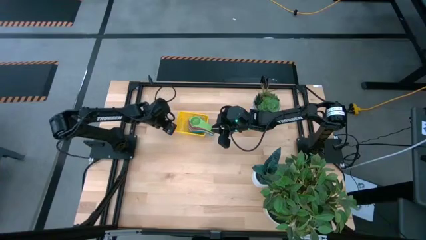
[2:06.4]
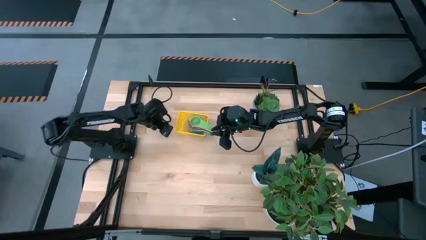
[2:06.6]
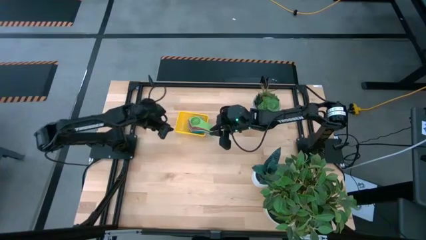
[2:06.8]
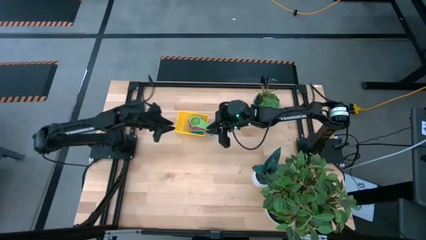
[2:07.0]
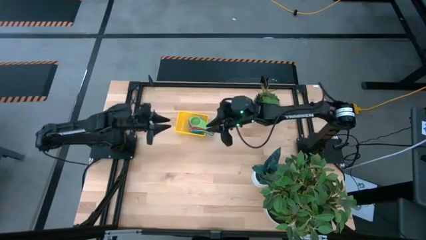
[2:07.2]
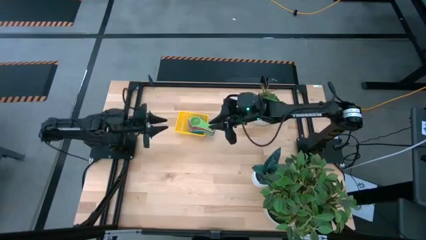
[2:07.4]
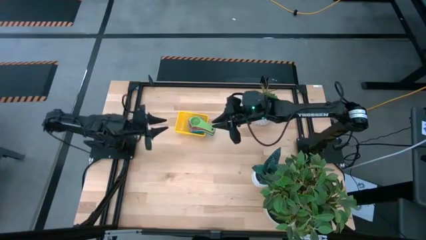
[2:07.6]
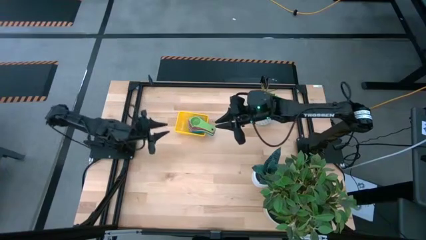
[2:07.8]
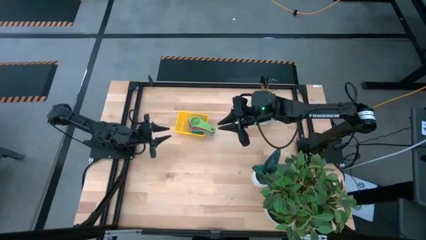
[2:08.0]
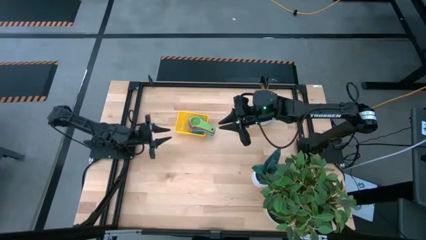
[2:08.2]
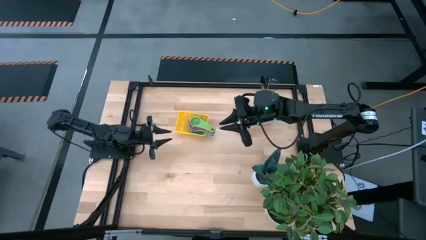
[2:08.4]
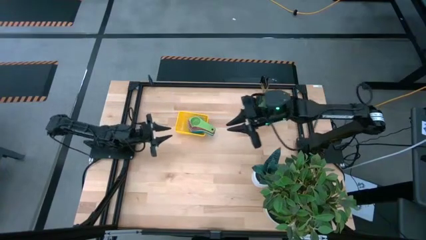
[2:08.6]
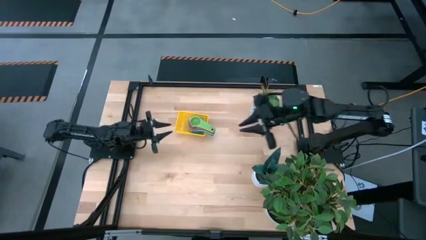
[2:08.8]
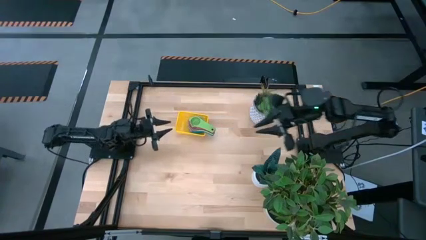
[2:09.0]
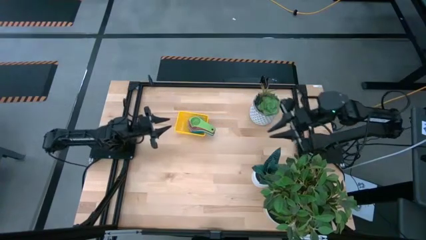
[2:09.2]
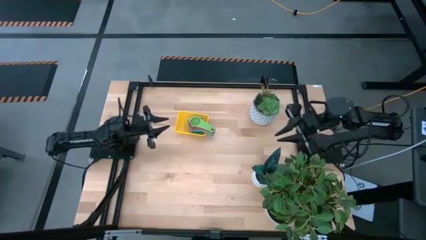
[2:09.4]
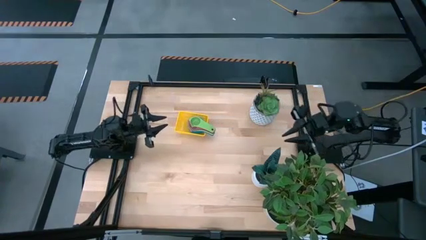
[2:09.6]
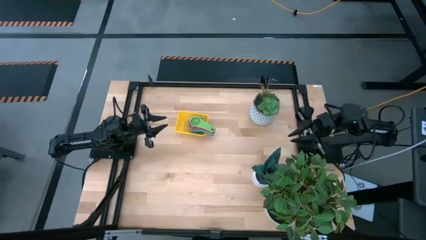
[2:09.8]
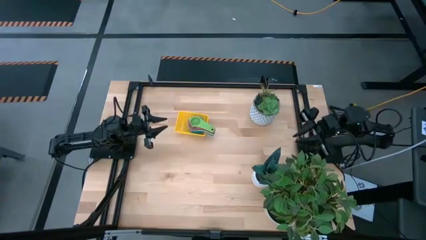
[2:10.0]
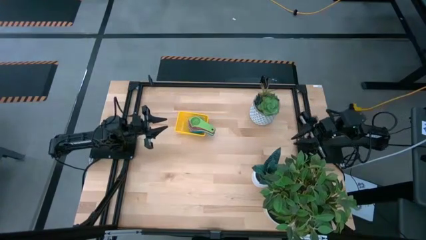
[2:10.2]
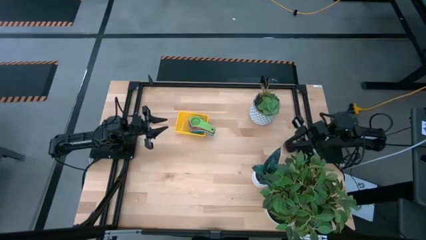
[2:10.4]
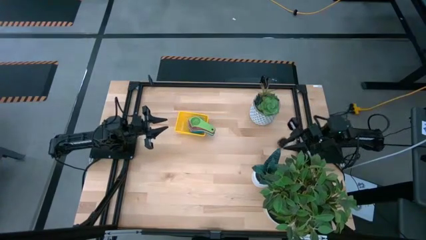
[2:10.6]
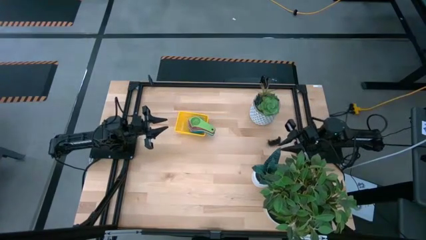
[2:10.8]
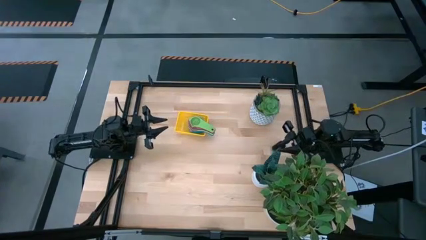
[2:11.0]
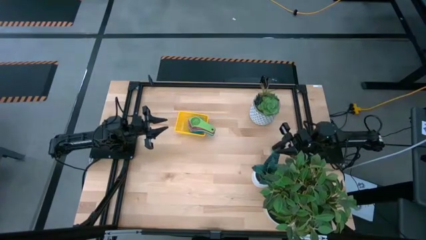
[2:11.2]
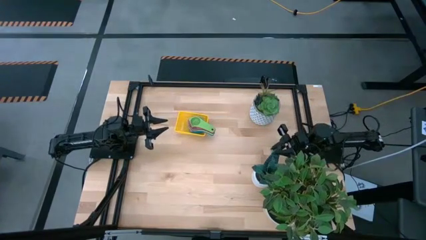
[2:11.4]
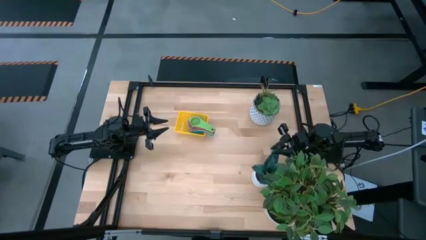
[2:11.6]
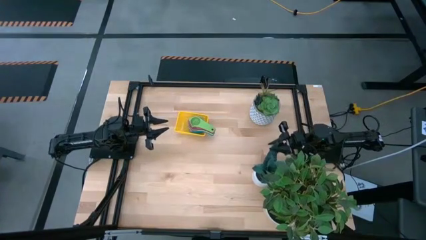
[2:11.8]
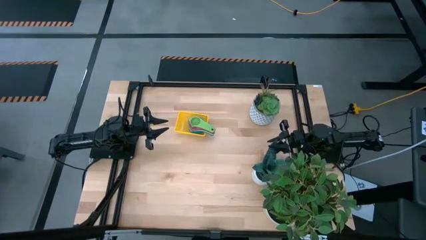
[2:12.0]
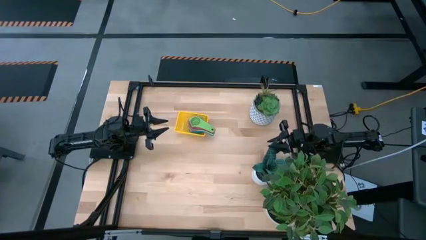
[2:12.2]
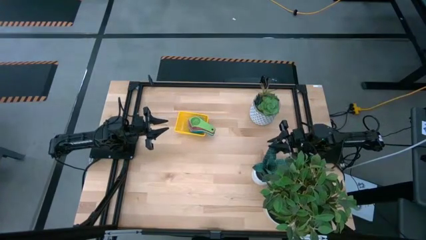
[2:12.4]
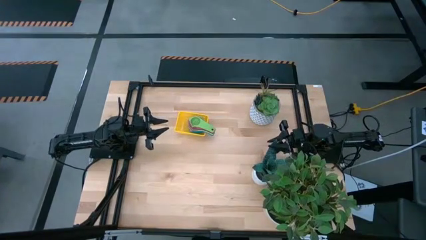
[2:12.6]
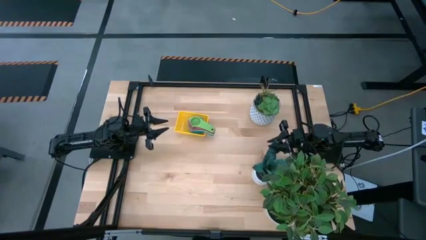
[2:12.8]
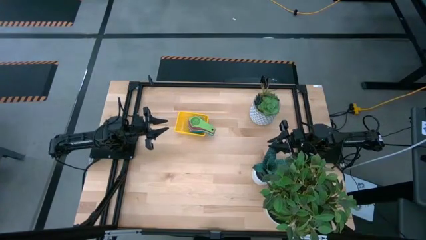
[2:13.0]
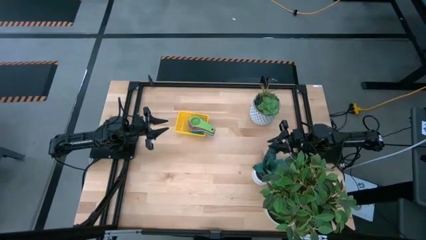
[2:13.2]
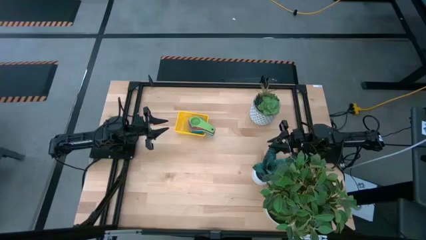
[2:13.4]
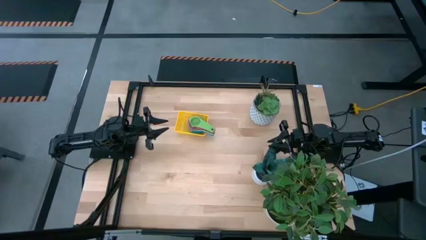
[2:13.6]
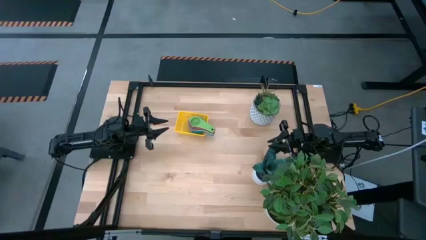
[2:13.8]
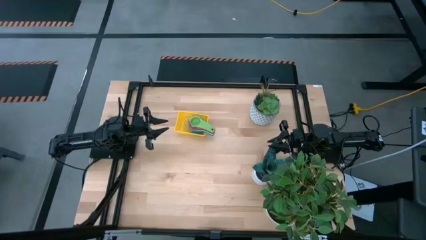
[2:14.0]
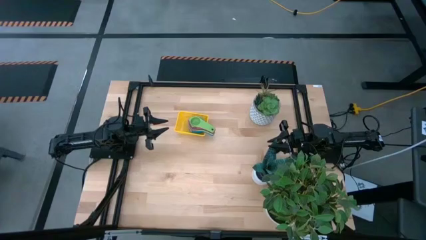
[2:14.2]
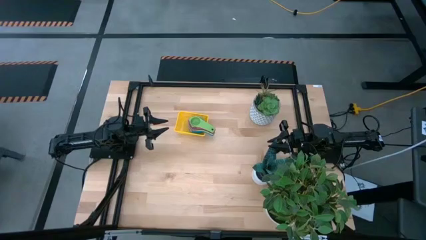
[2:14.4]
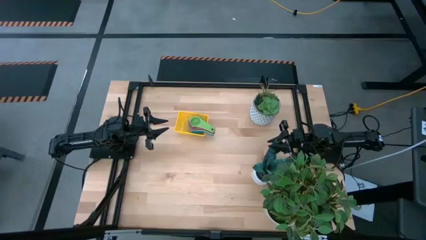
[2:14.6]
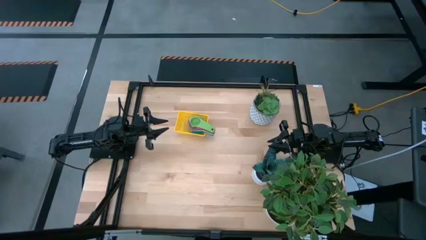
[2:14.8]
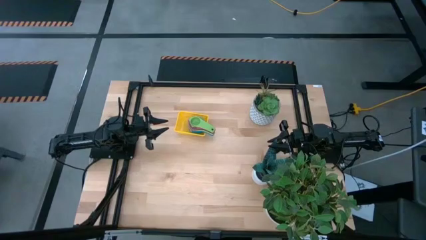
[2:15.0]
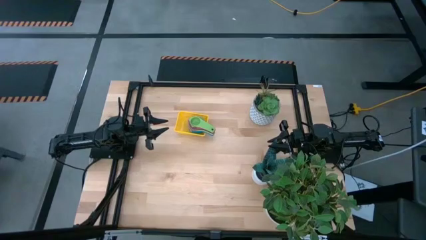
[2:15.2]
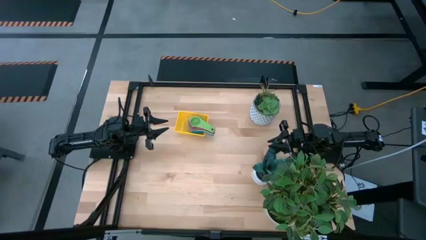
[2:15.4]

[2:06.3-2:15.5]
Task: Nest measuring cups in basket
Return to Home Position

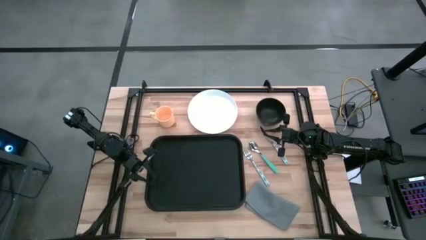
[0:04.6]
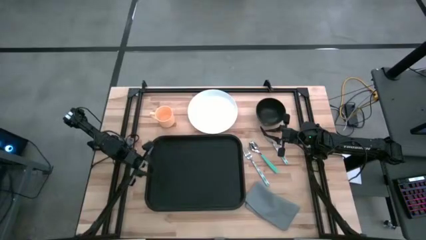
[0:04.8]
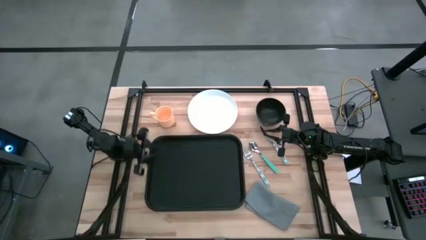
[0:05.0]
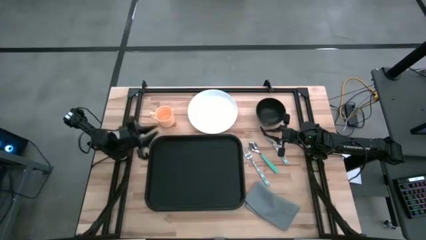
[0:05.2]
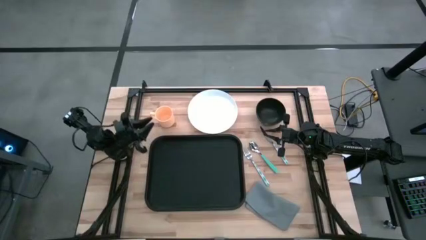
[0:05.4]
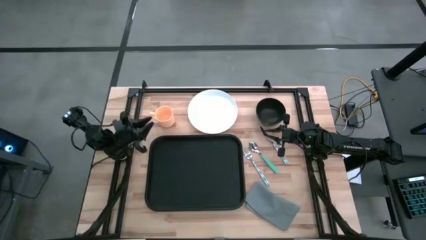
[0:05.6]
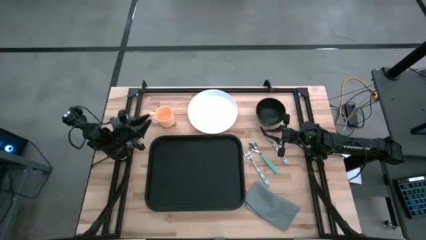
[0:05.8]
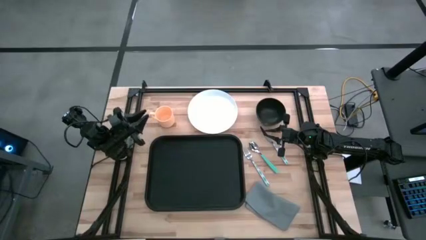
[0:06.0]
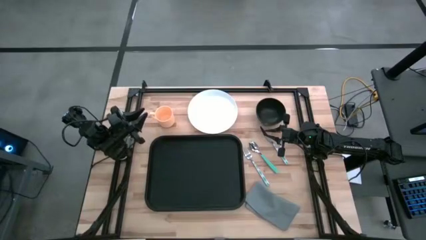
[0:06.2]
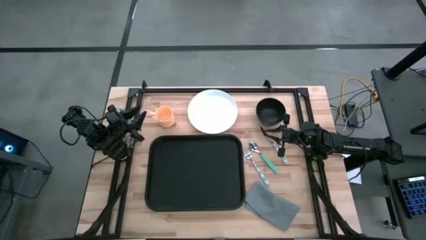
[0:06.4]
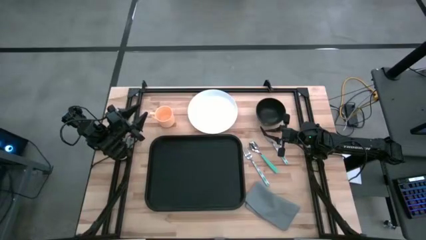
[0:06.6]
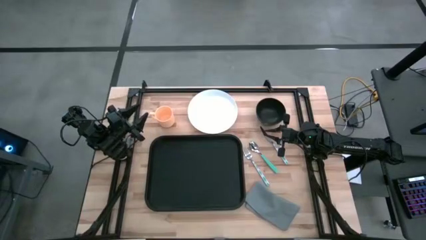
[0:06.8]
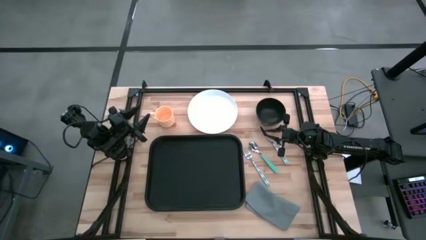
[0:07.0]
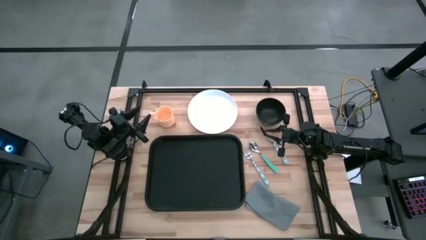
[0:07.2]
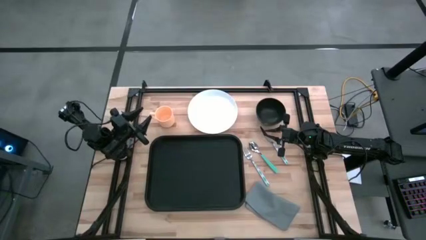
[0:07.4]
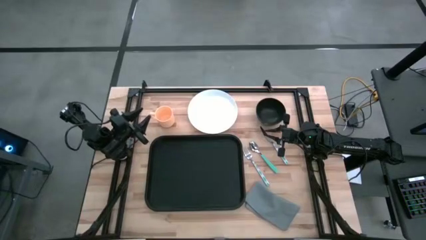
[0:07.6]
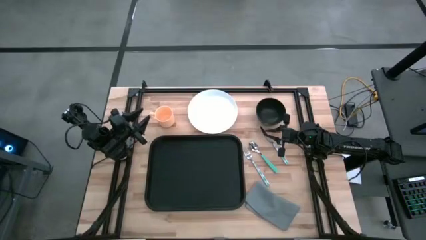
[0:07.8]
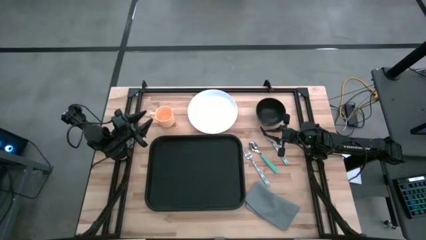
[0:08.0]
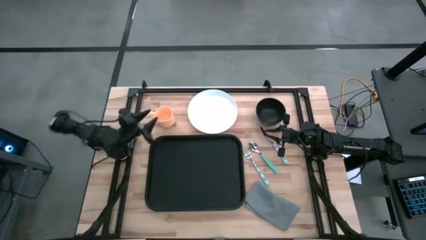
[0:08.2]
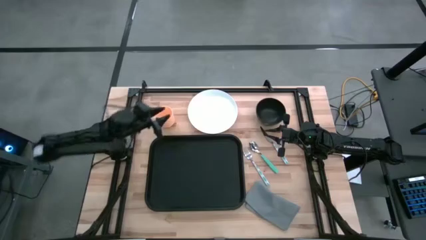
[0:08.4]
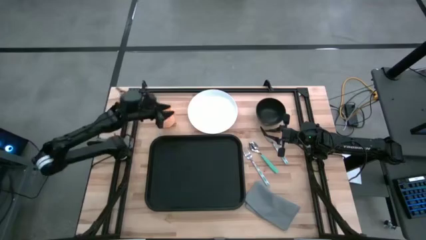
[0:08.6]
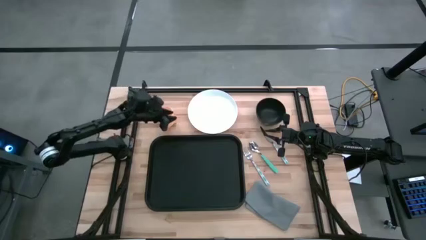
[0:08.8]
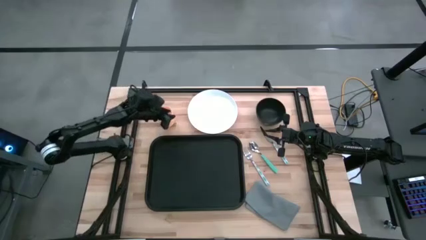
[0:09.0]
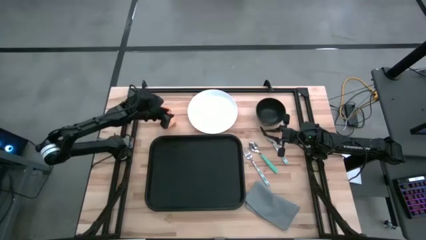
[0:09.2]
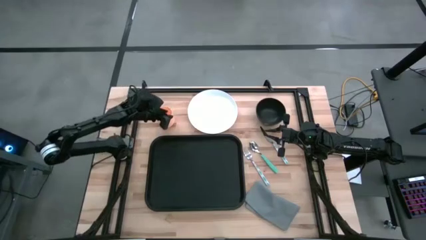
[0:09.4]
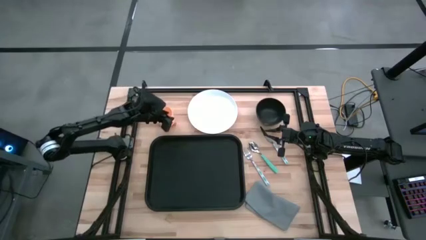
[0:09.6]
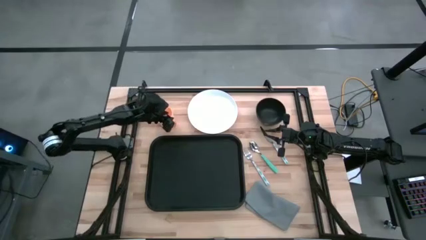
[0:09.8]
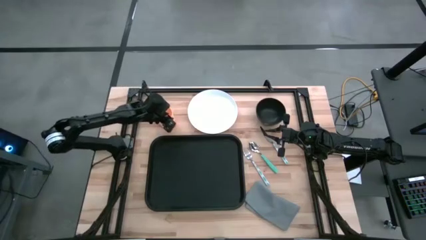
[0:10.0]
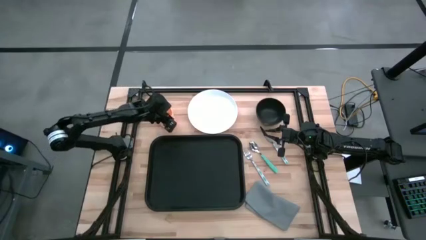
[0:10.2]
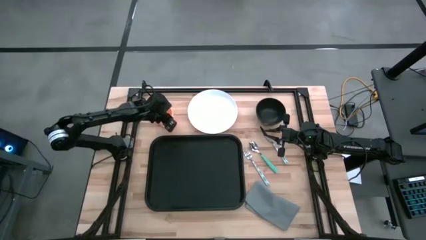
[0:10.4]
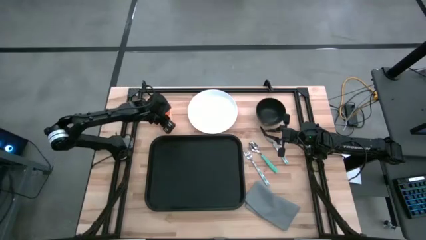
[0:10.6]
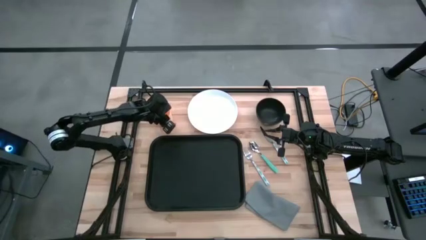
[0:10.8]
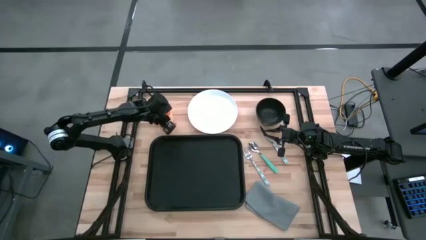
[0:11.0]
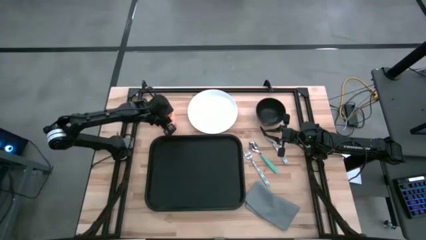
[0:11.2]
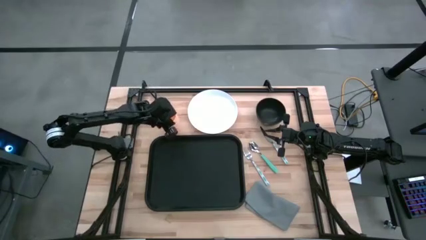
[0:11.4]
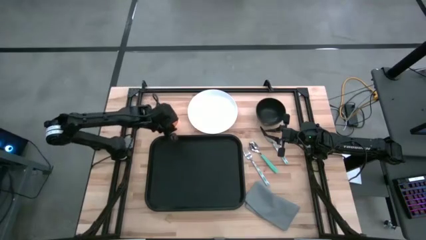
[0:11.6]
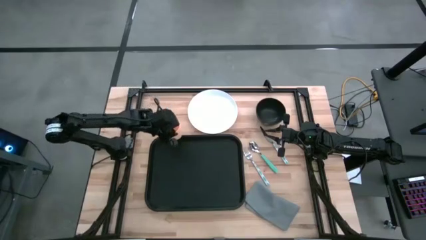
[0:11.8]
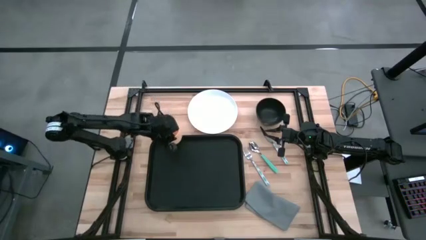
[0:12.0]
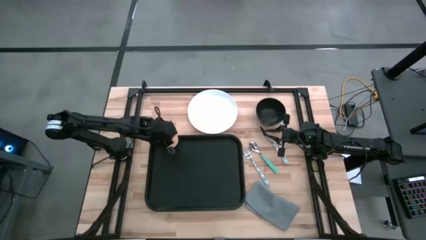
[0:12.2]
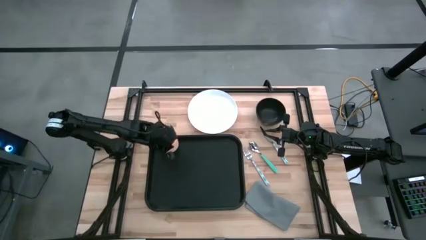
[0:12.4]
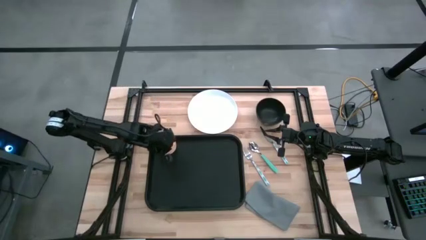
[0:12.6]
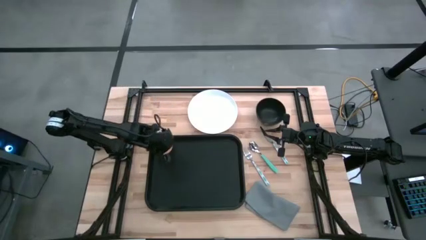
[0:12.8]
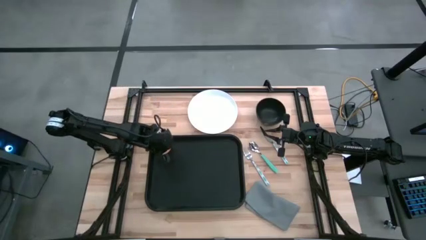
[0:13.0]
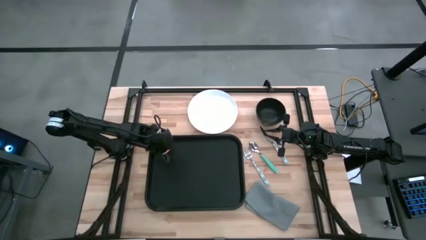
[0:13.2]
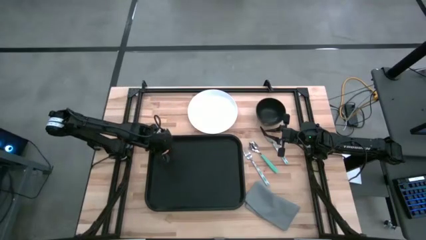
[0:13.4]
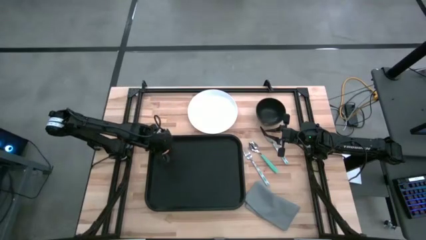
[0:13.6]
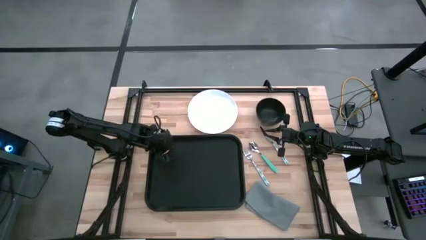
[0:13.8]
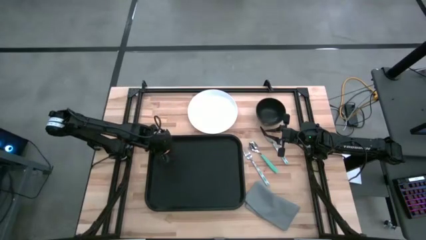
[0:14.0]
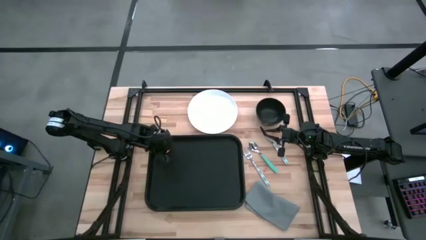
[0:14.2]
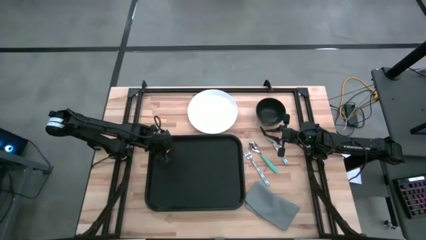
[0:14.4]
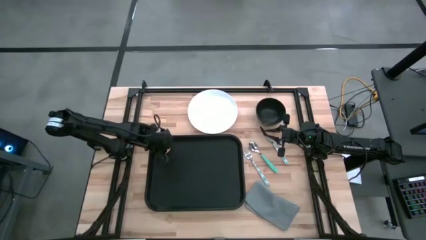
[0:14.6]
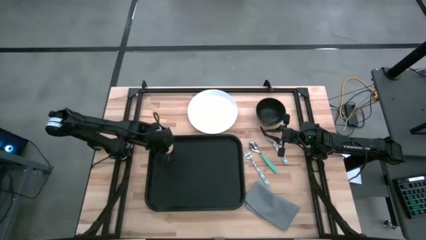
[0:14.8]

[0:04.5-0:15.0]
Task: Set up tray
Put the orange cup on the black tray
